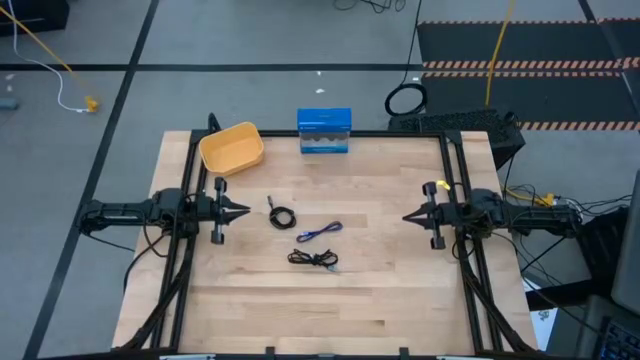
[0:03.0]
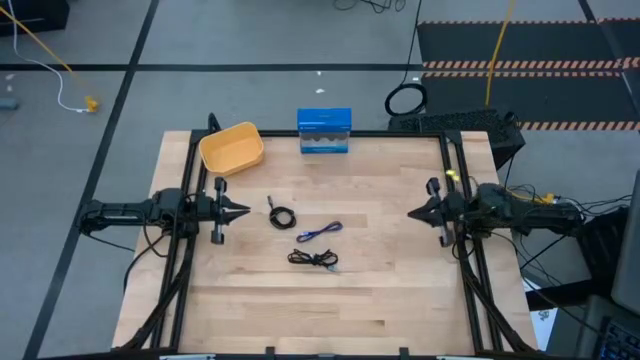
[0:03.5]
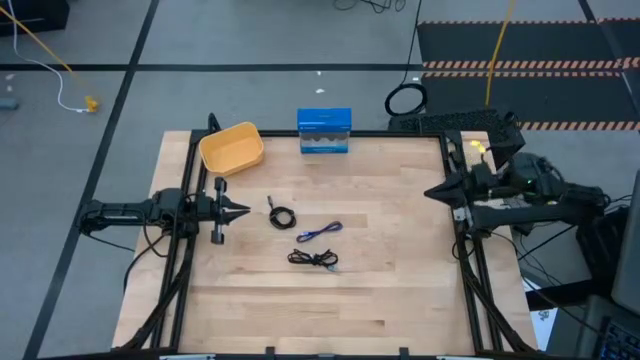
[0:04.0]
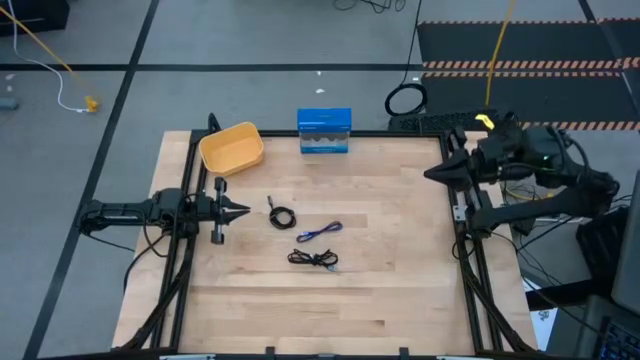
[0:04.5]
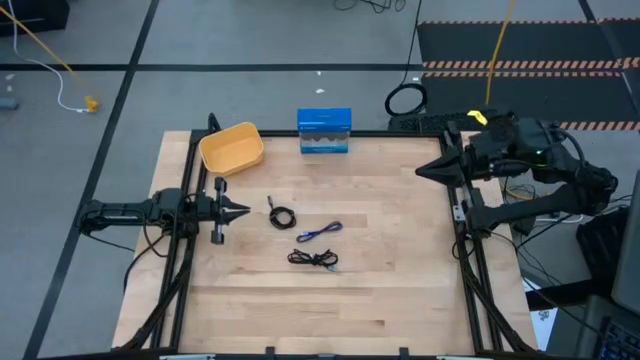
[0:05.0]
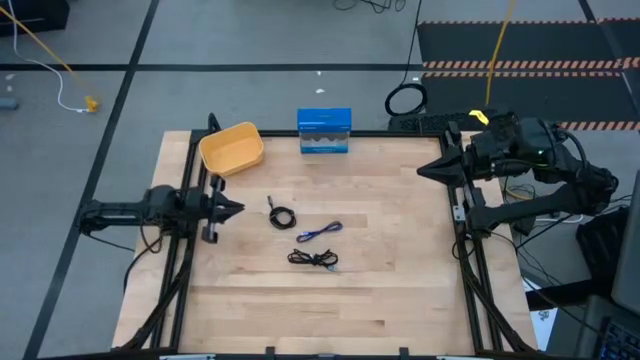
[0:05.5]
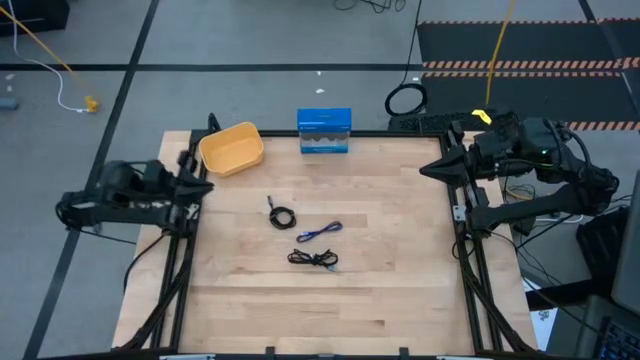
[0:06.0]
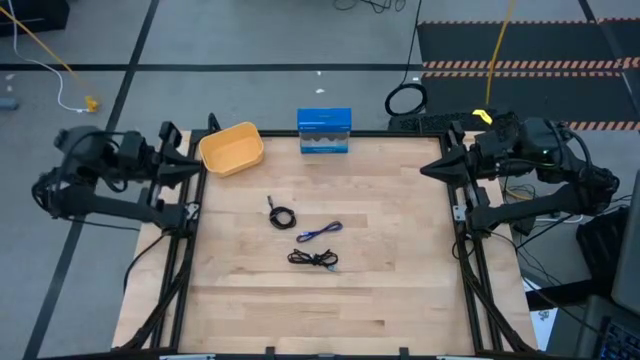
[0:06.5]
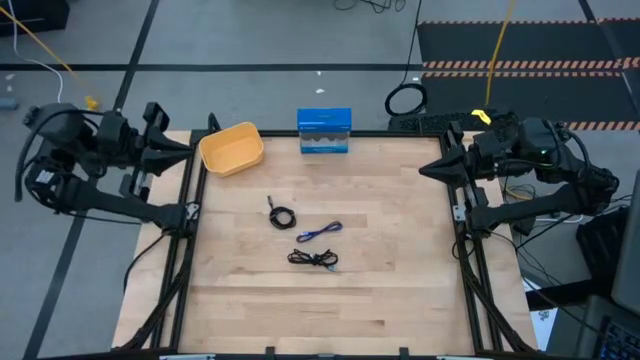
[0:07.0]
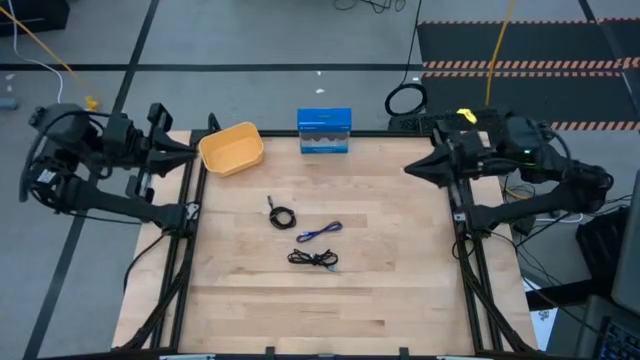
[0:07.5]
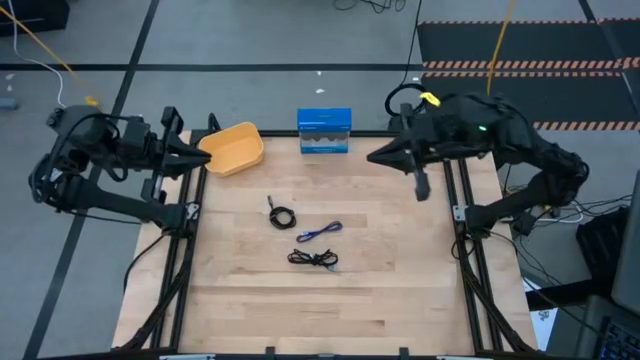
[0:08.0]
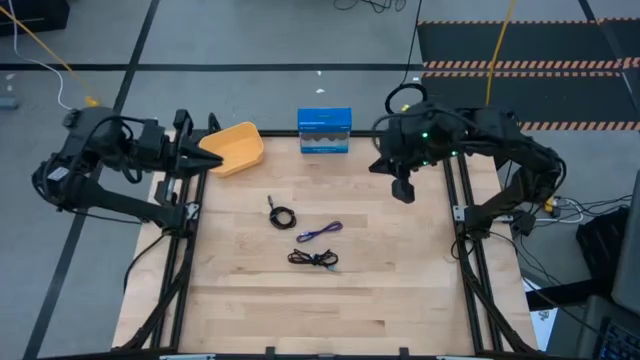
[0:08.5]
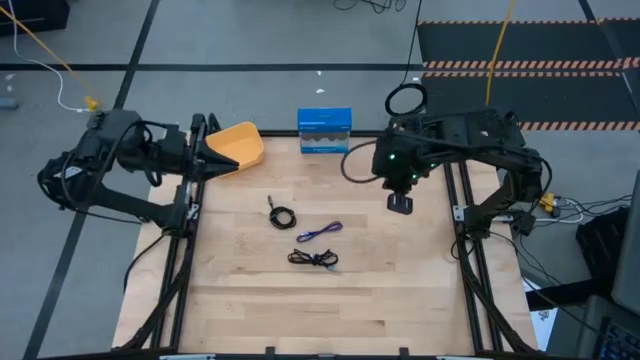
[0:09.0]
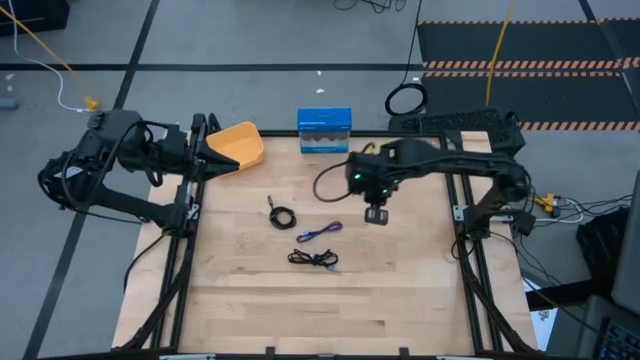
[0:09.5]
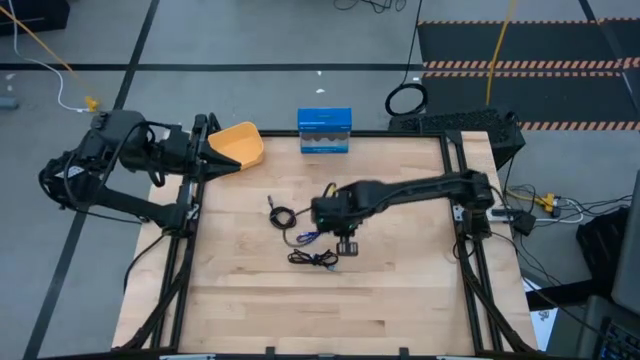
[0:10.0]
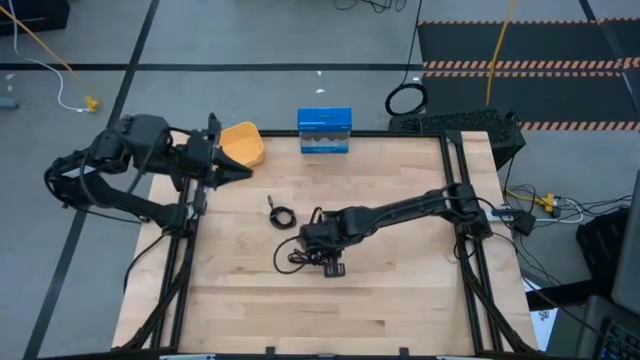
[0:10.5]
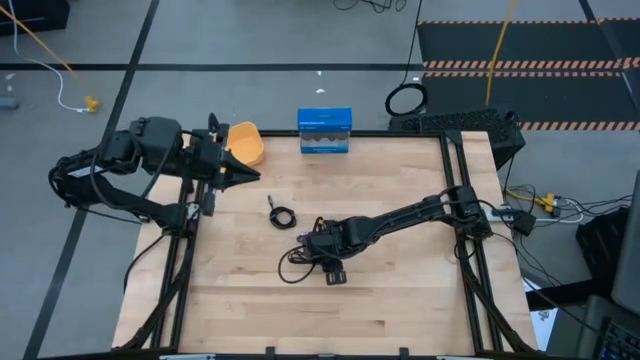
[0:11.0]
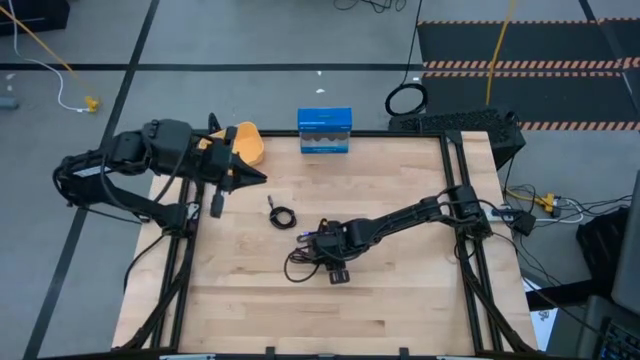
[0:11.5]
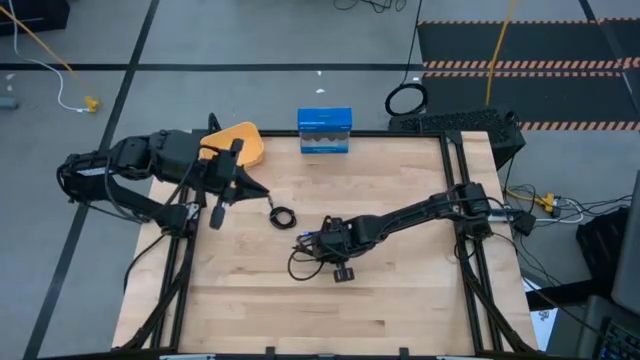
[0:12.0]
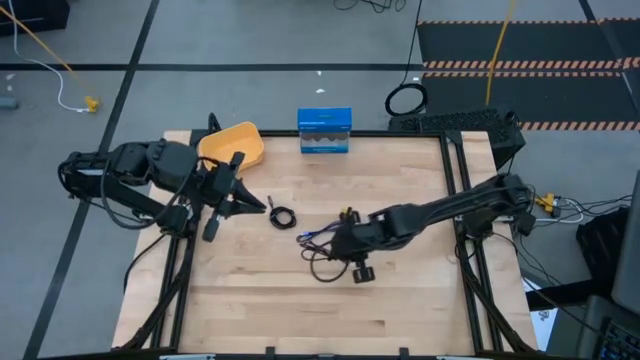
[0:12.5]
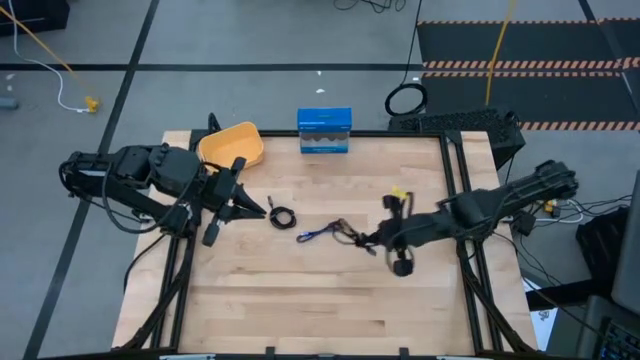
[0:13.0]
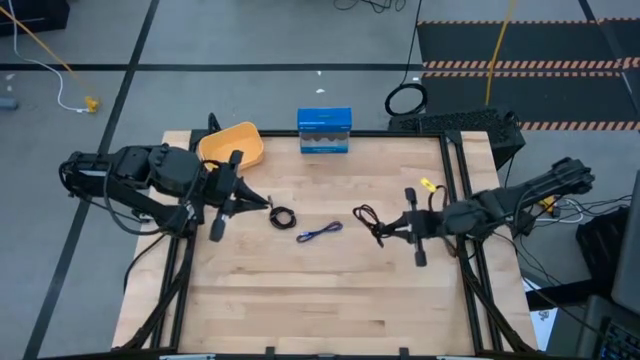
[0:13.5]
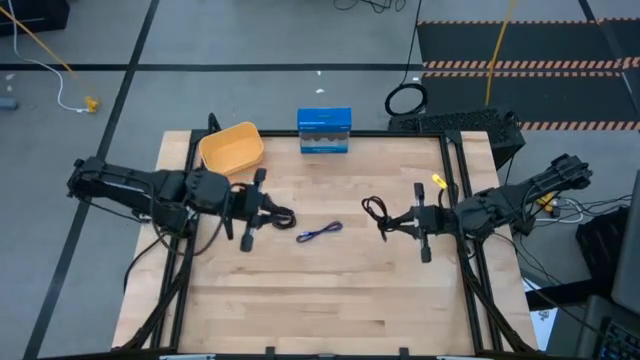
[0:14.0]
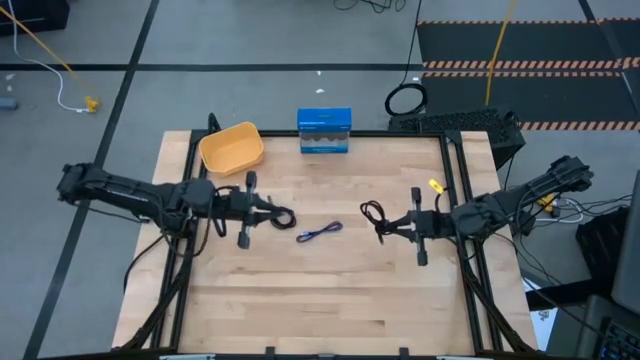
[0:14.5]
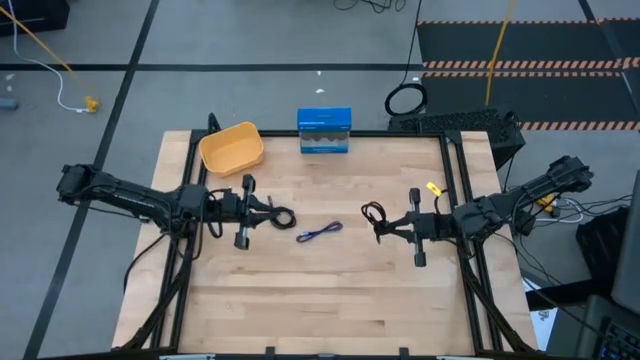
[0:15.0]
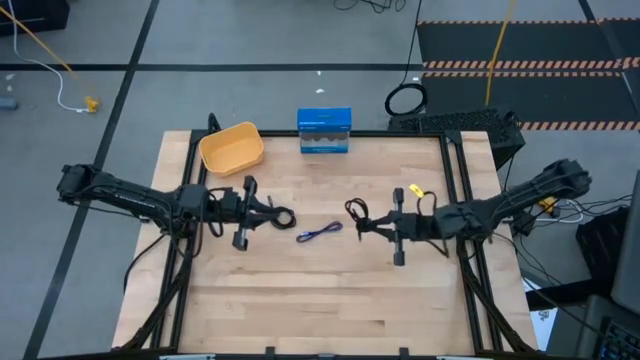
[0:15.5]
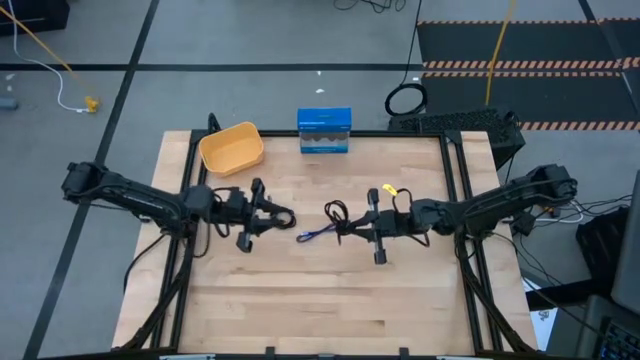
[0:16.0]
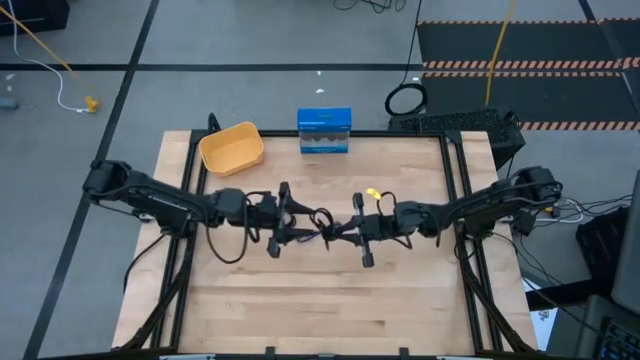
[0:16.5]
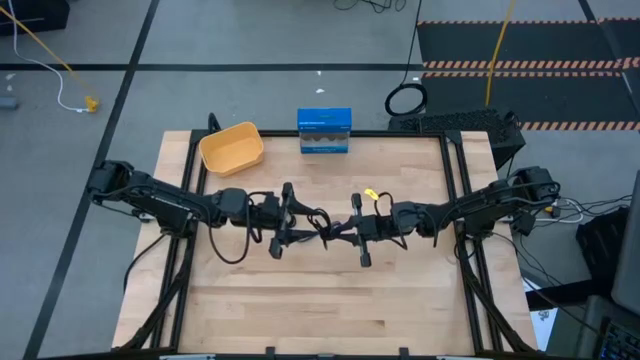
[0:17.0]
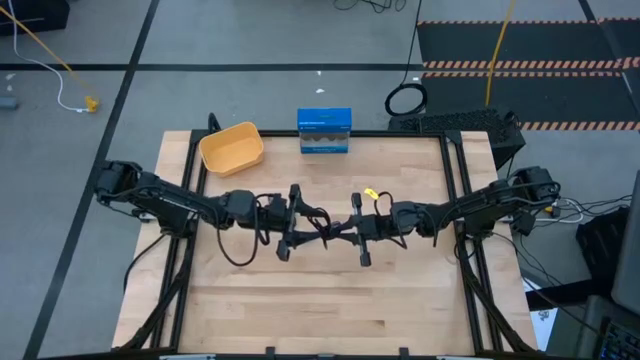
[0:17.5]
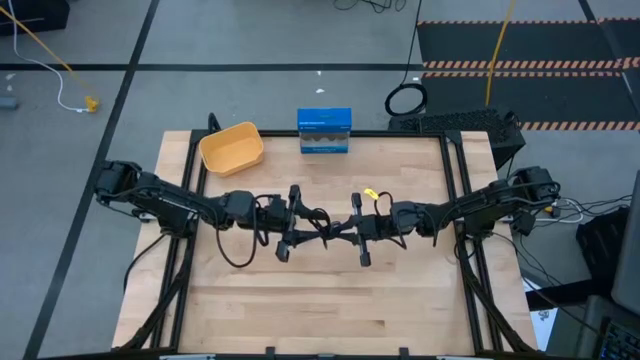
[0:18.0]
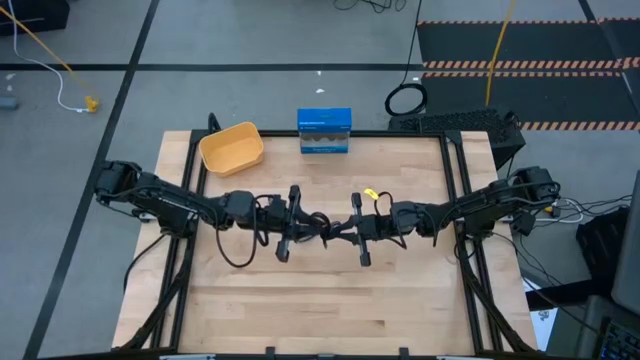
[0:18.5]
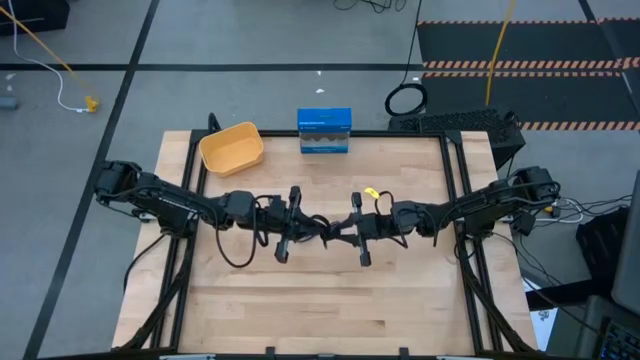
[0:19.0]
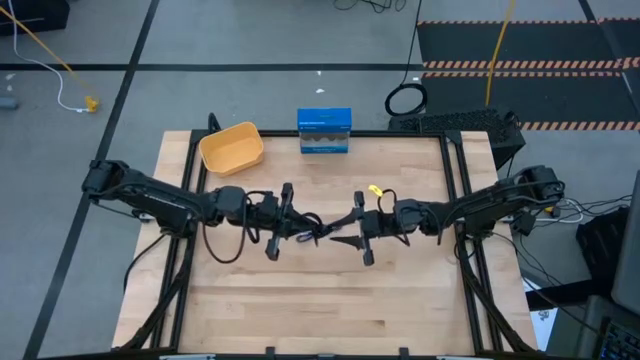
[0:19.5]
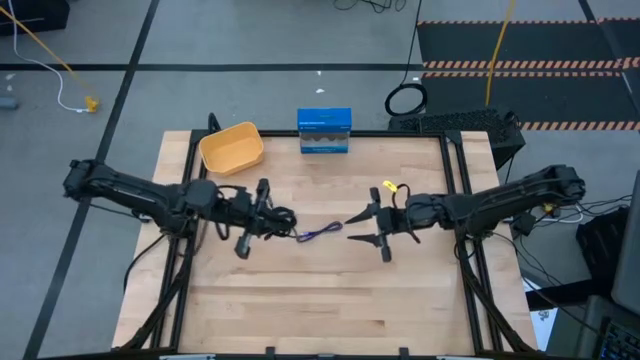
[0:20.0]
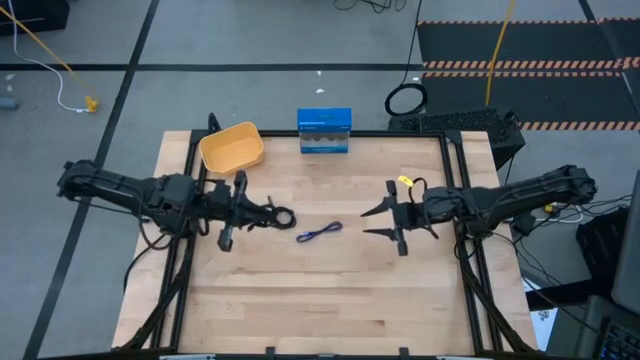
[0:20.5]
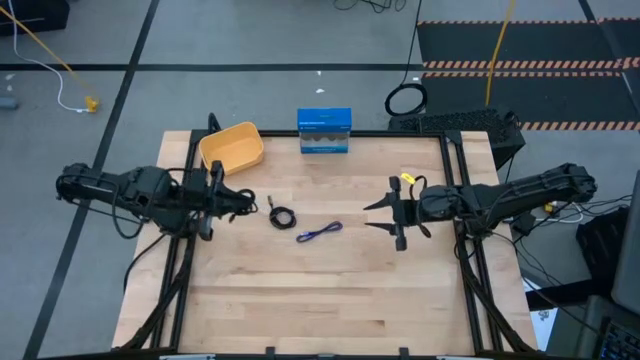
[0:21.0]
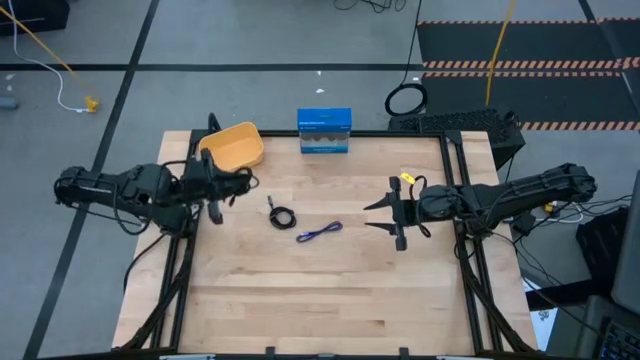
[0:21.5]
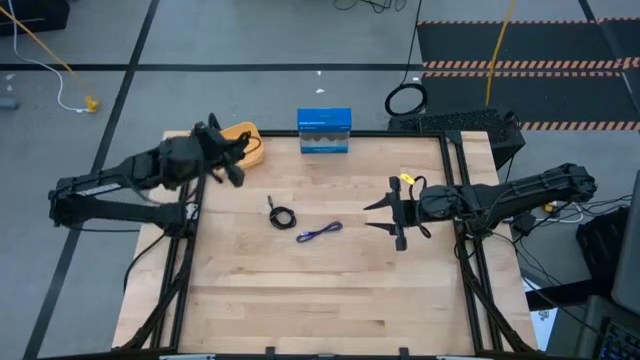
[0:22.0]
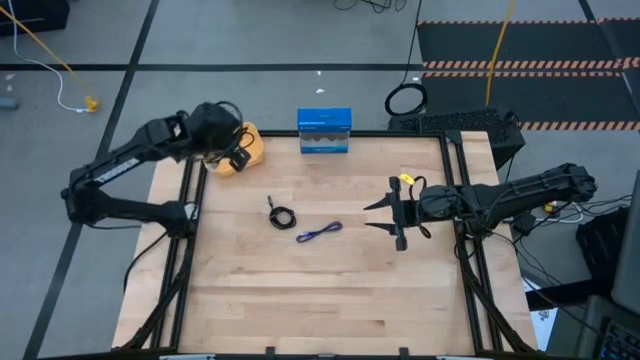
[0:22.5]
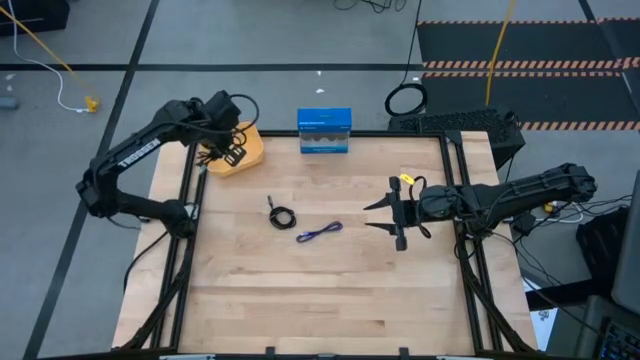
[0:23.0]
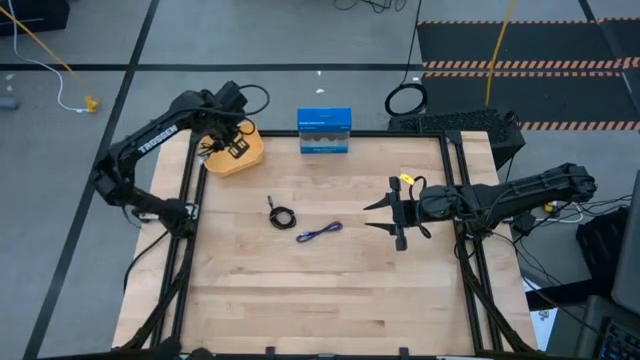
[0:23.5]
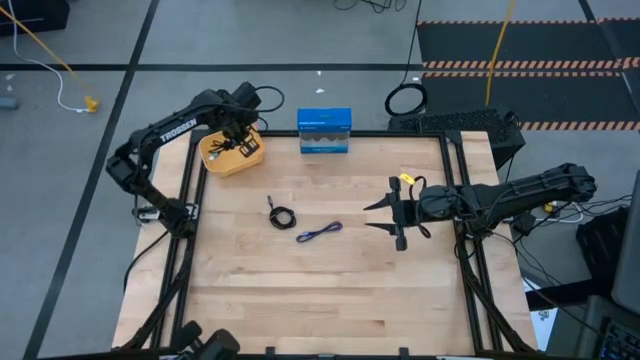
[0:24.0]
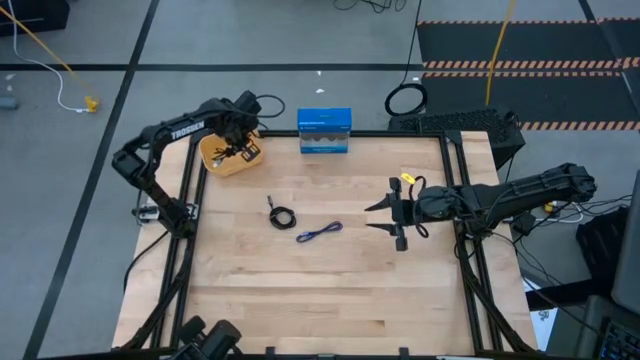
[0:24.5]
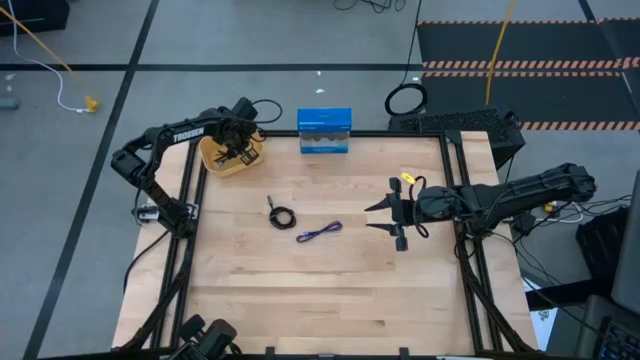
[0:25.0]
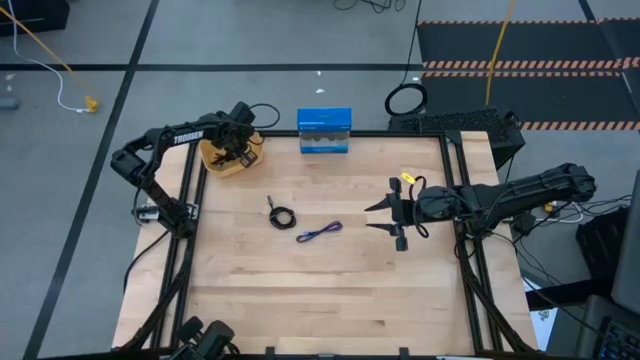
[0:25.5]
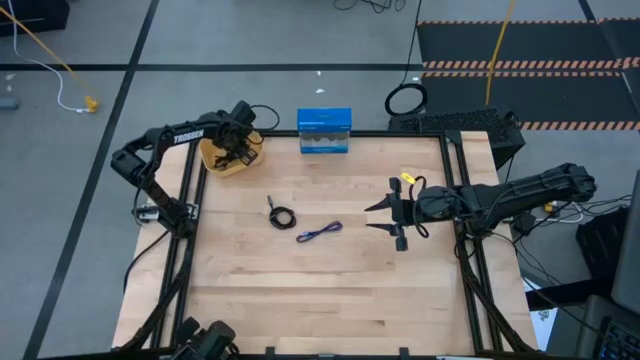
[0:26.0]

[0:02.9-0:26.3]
Task: Pick and place USB-C Cables
Put the bottom black charger cable into the yellow bin
